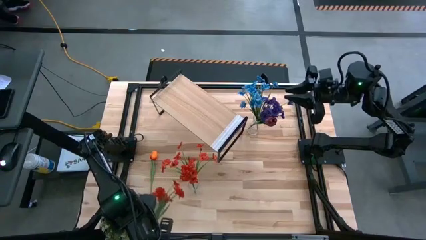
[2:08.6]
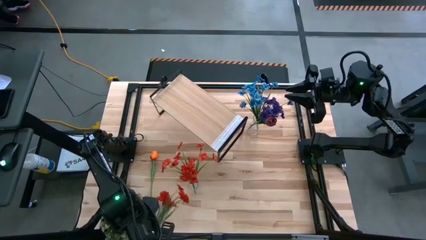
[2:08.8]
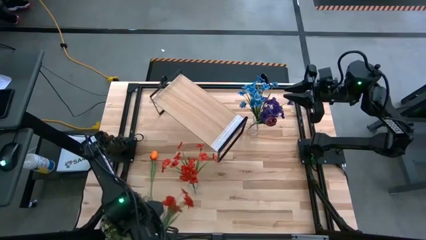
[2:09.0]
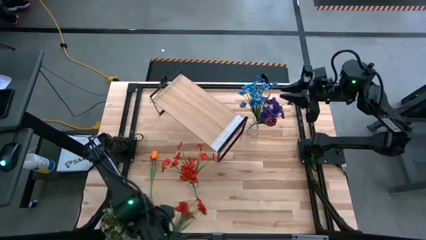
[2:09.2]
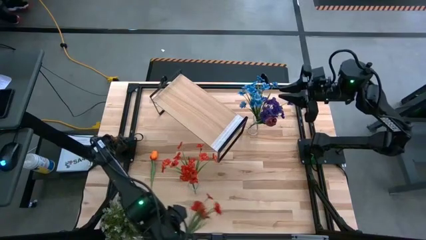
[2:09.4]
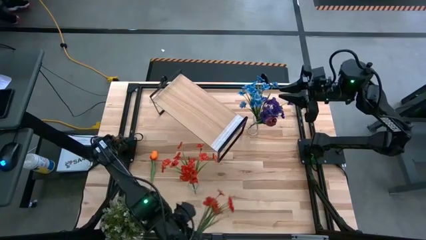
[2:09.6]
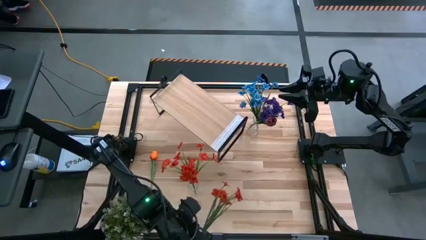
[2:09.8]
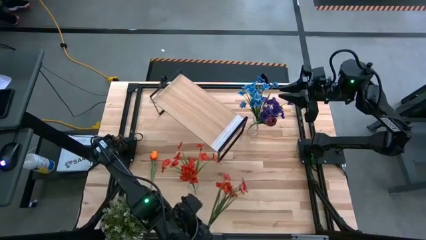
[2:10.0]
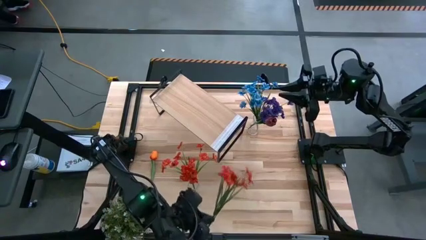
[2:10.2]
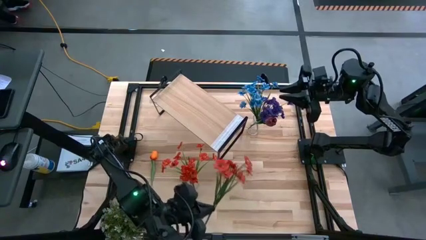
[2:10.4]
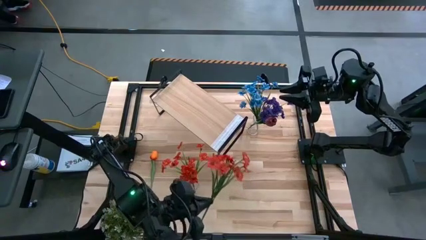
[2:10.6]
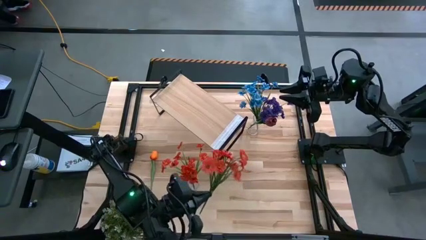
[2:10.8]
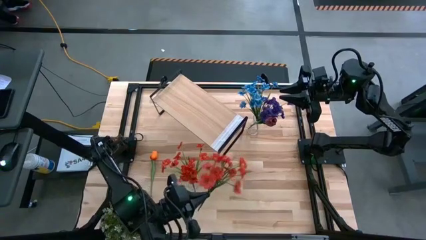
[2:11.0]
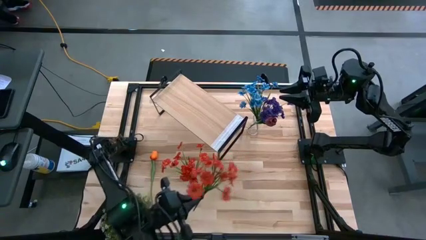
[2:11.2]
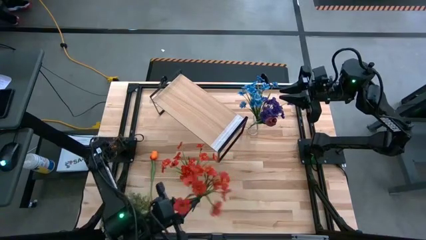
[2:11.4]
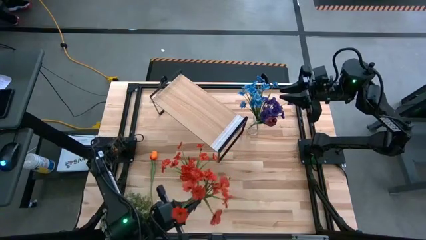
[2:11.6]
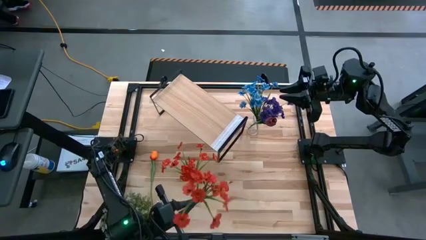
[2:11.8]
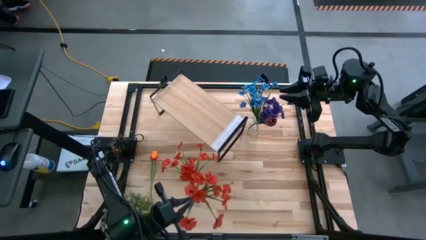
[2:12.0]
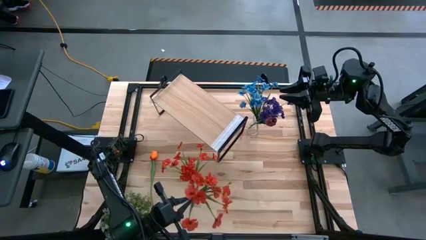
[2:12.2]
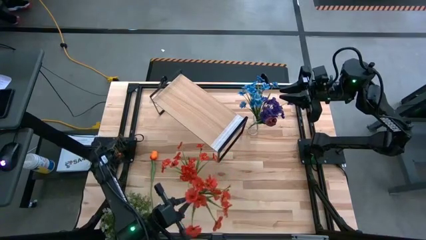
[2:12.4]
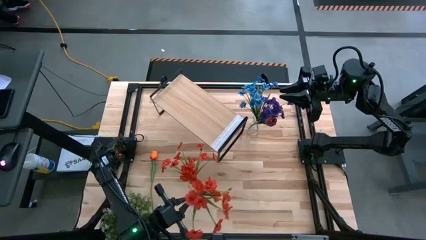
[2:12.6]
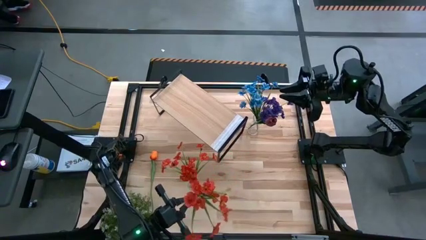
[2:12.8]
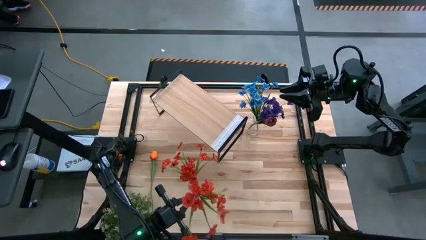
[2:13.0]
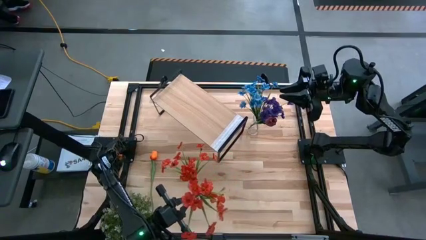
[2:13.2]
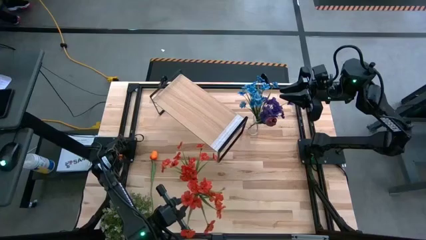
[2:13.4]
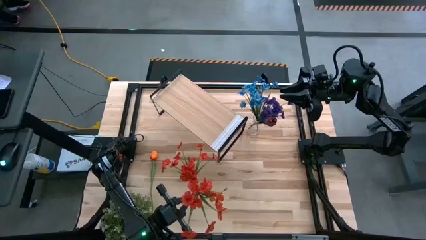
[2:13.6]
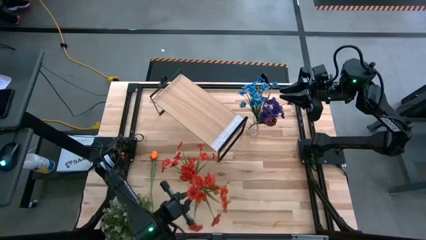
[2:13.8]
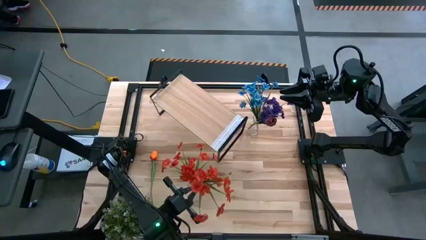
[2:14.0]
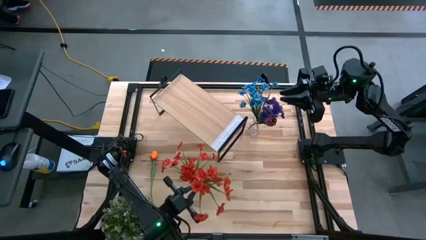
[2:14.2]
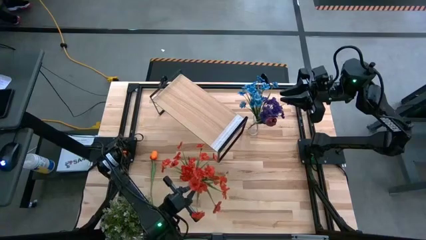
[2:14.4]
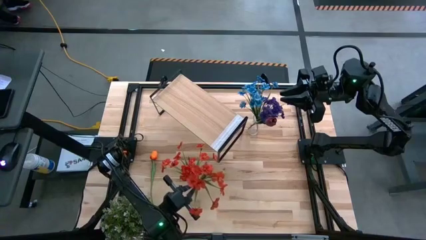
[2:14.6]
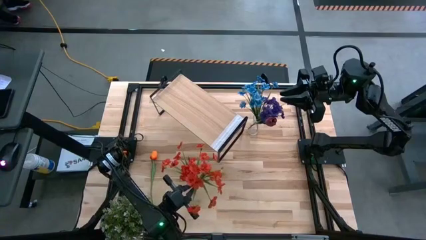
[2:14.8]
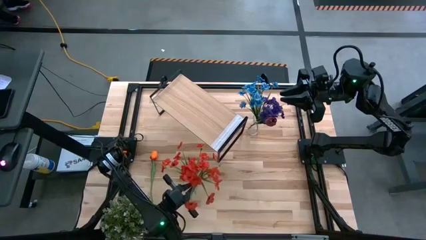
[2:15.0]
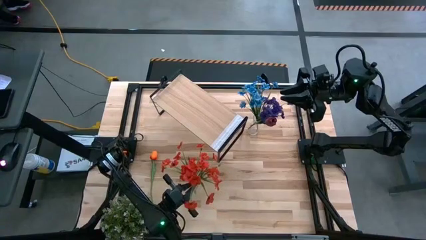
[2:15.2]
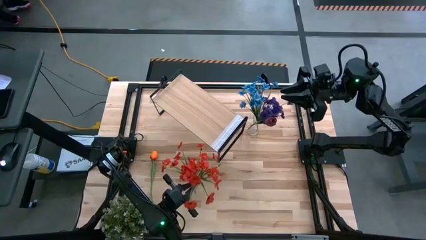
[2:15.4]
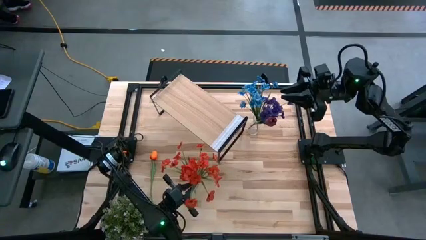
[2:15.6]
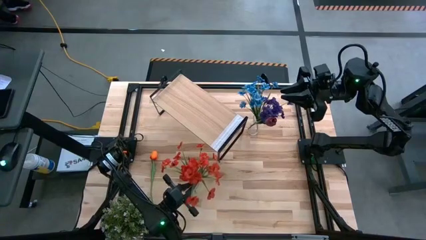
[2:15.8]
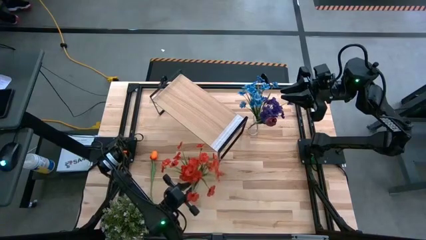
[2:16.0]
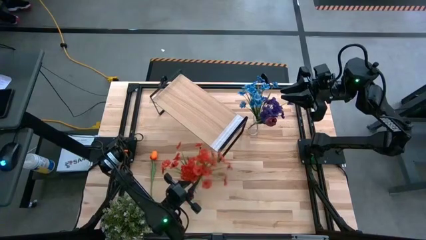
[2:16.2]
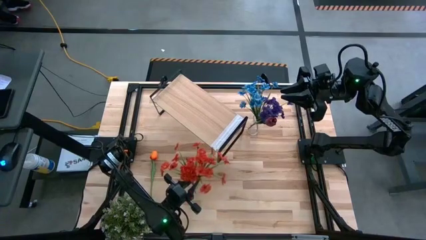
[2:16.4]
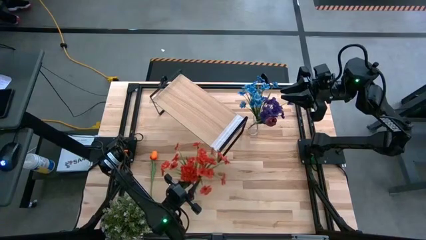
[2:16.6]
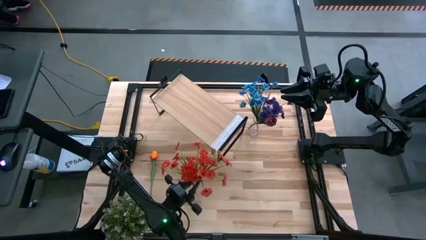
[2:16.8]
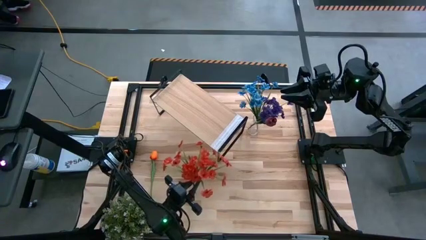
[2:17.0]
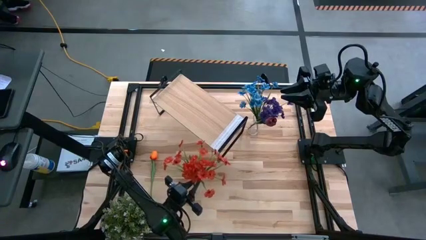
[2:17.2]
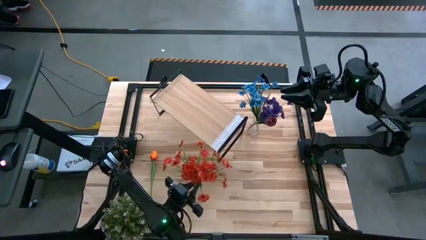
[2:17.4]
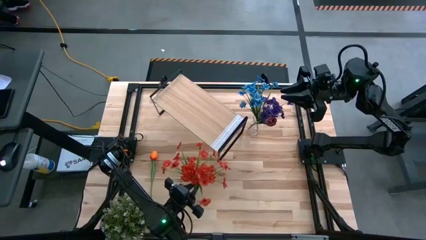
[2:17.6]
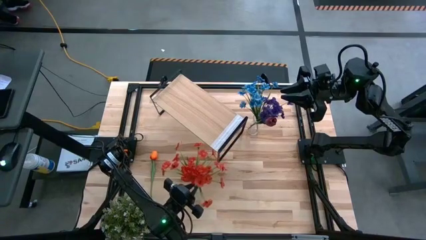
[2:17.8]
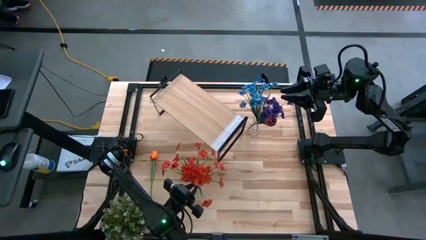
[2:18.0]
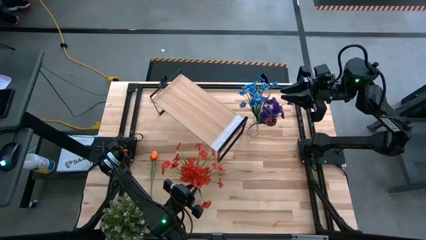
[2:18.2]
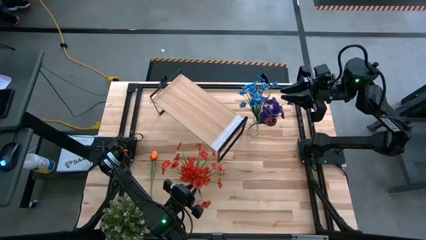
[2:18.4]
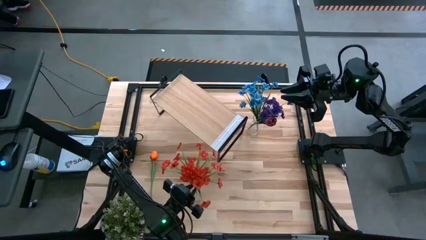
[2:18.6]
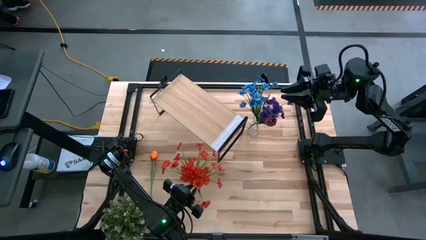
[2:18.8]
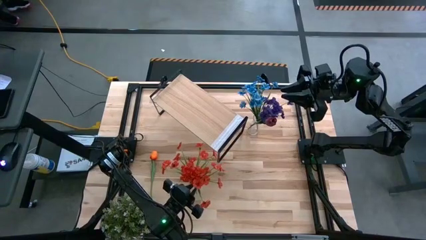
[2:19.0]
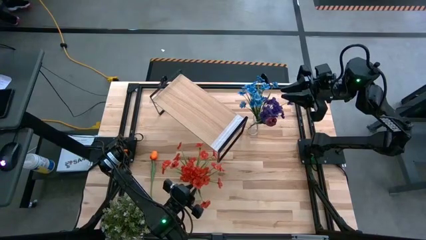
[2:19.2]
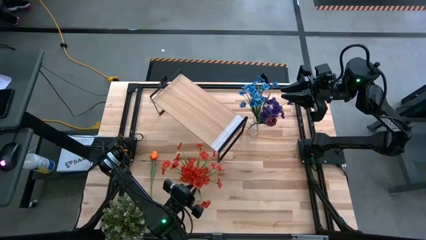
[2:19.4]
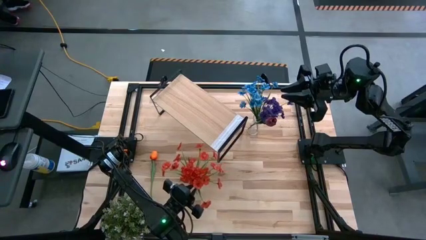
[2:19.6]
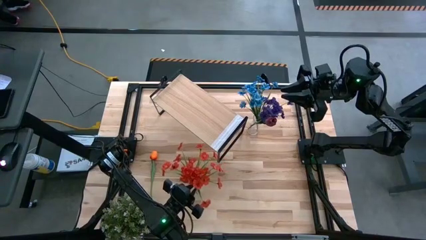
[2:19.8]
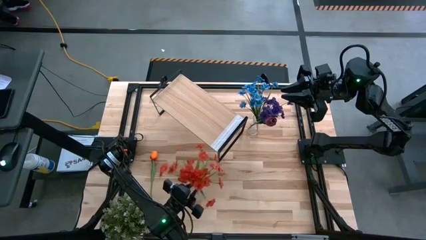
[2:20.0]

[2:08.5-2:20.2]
Task: Pick and place flowers into a vace then onto a shelf
Put the red flowers into the bottom transparent vase

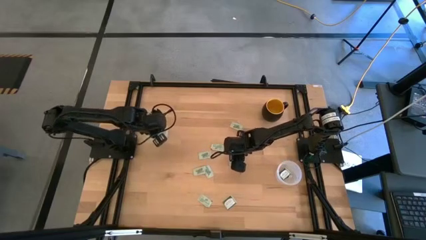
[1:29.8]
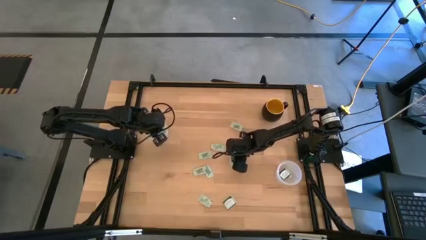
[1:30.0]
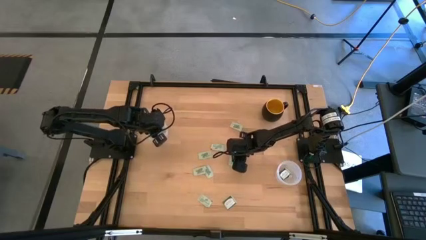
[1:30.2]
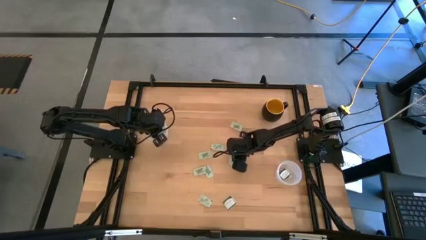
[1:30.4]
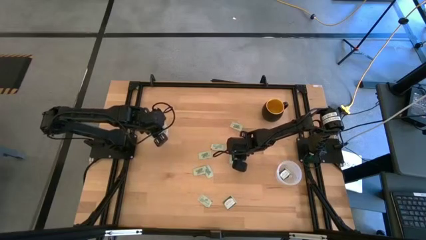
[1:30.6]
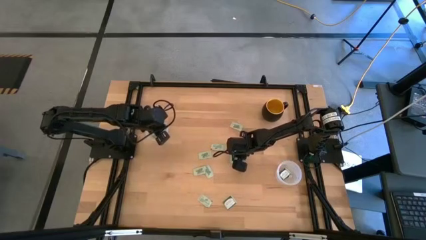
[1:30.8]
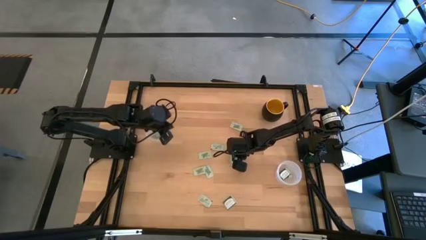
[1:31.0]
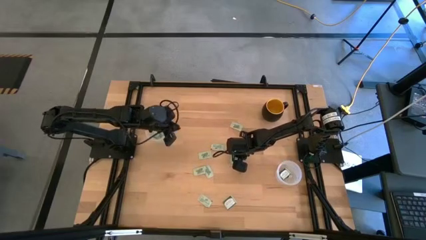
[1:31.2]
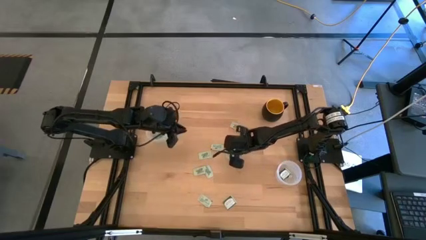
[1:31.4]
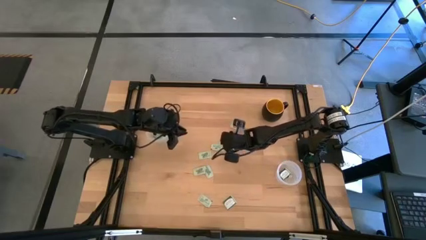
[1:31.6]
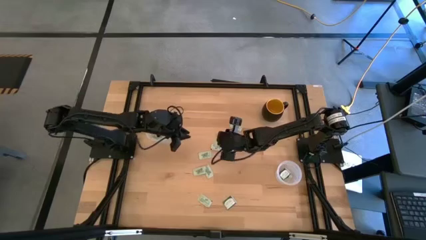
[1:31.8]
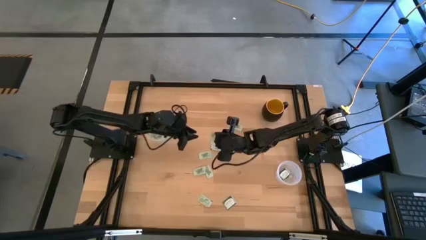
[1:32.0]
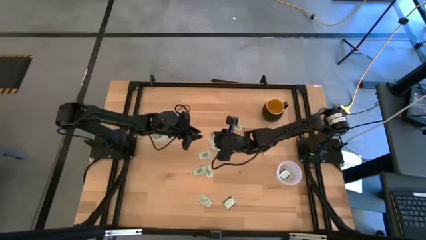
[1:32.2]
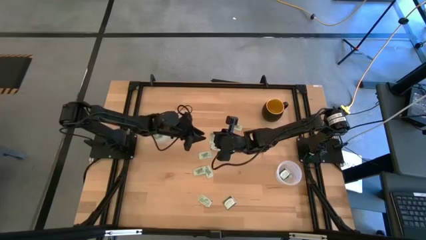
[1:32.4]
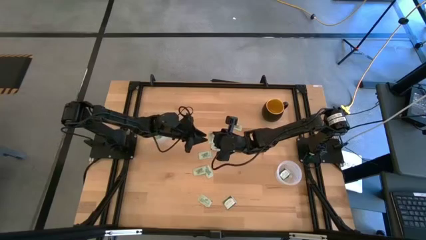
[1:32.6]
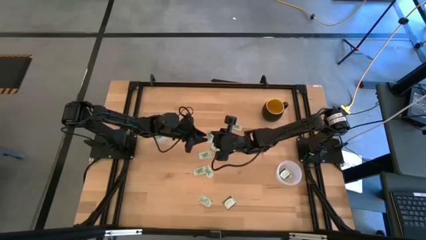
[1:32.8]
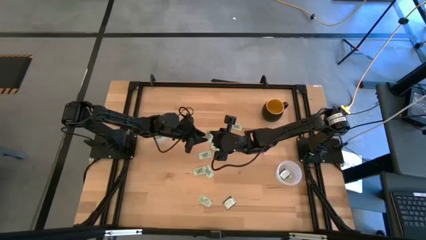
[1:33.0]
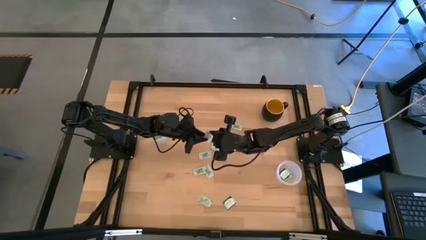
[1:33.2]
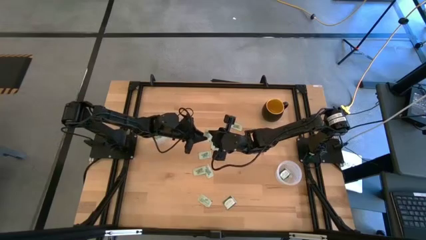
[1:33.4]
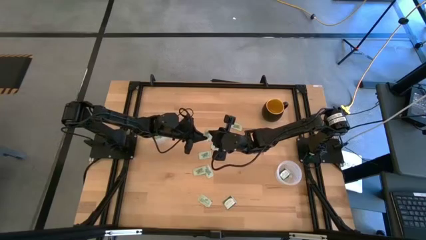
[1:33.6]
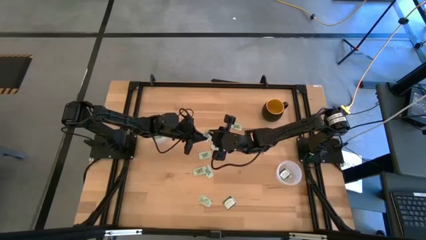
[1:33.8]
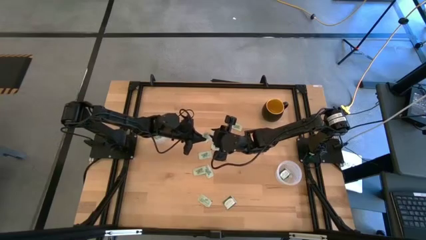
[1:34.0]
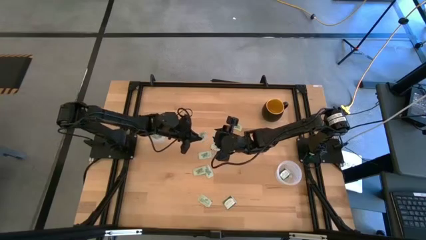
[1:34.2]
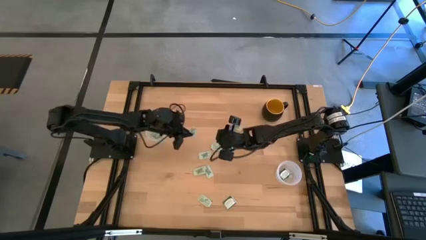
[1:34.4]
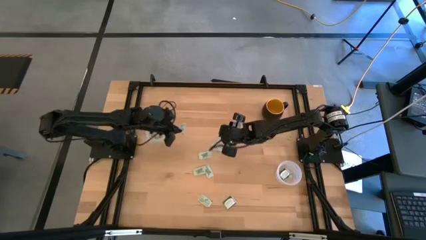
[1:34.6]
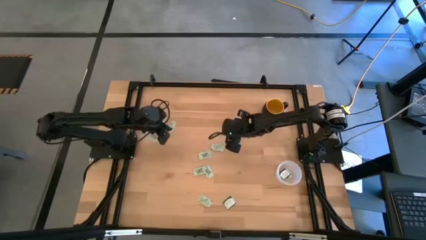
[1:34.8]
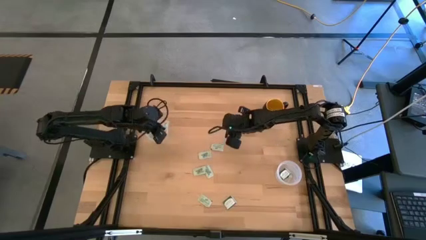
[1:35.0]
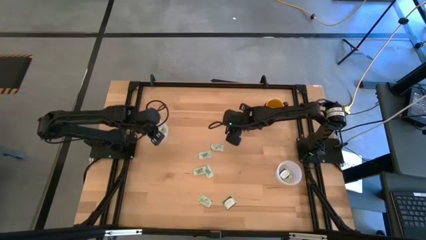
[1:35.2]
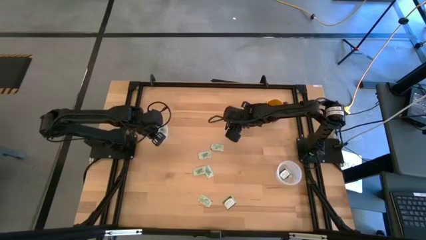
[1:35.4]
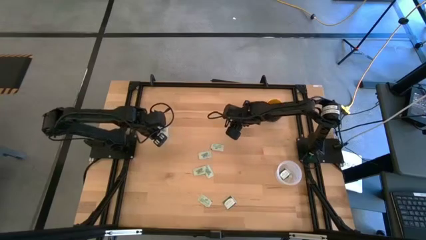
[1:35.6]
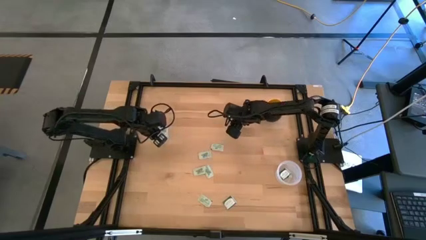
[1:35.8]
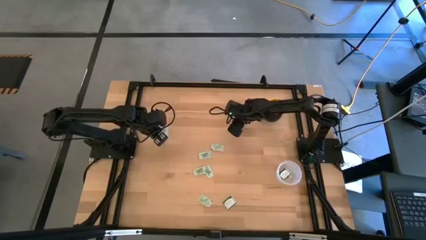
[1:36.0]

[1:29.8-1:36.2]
Task: Pick and place Stevia / Truvia into bins
Put the white stevia packet into the left transparent container
